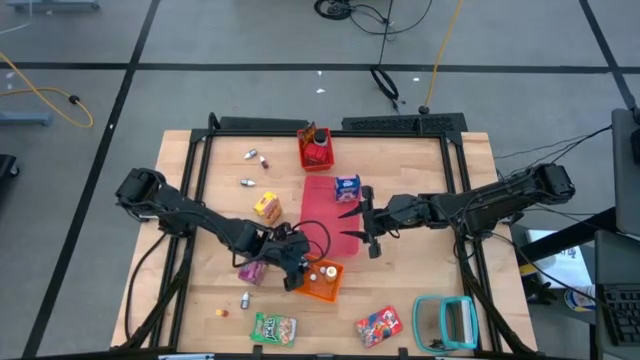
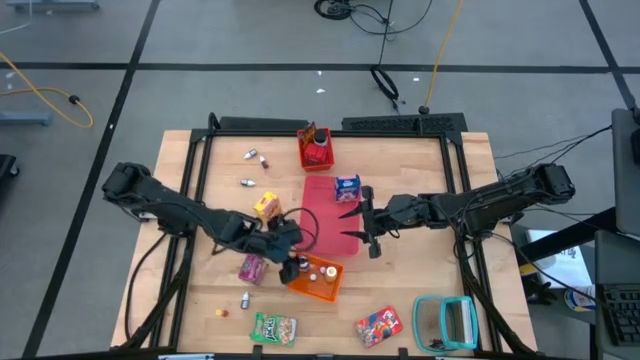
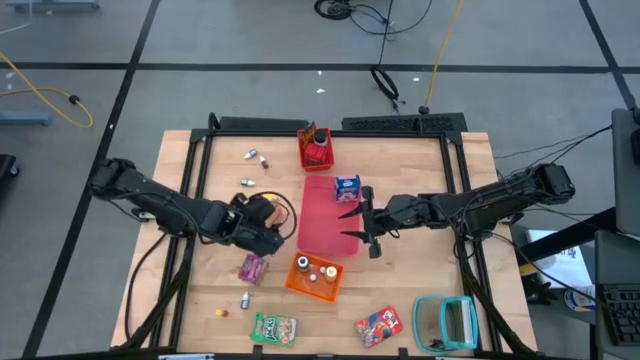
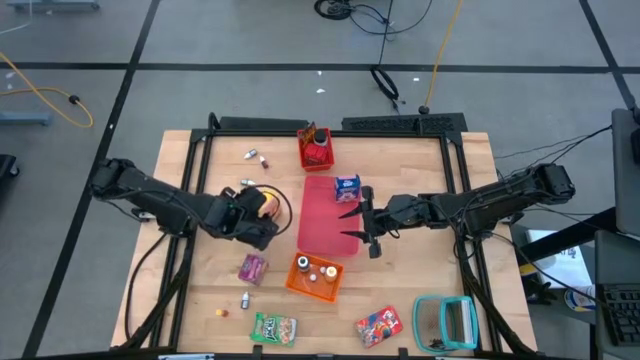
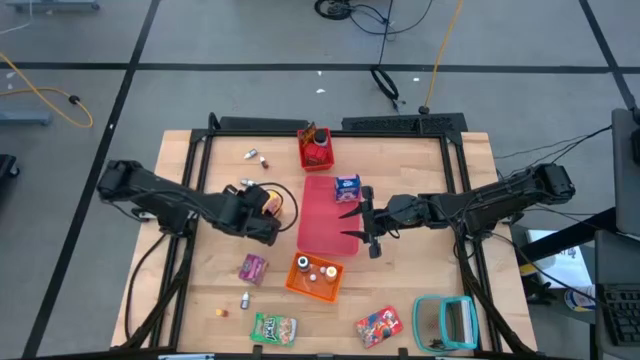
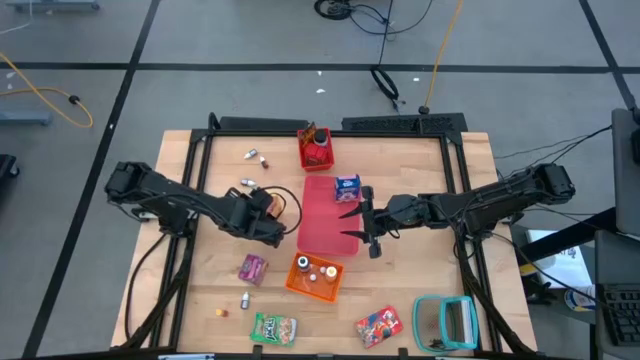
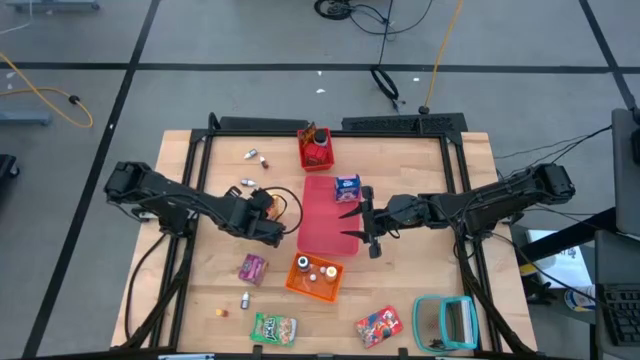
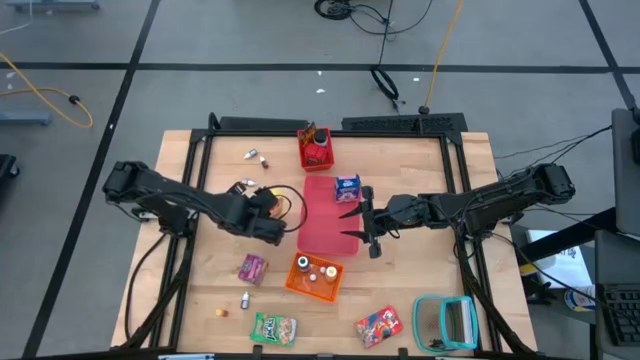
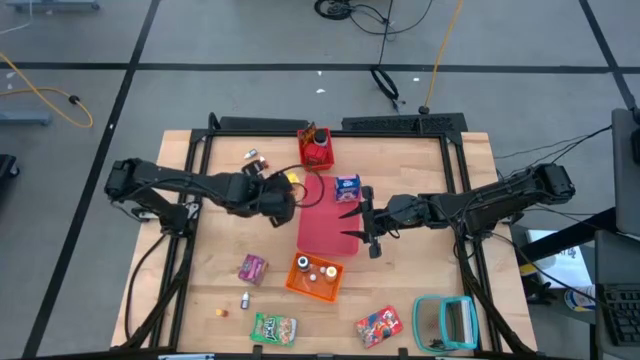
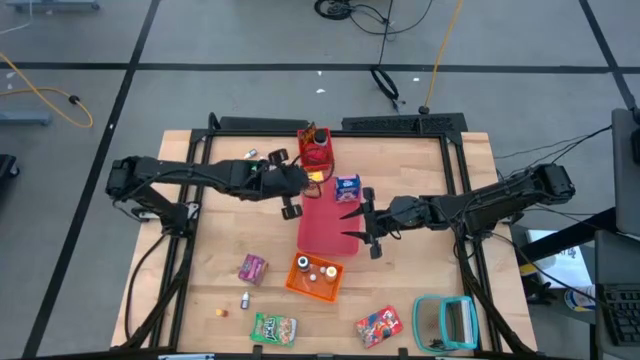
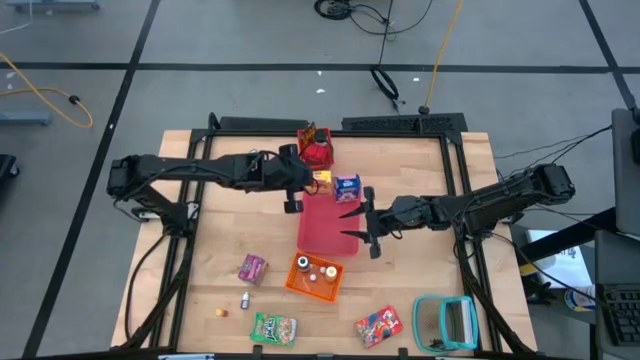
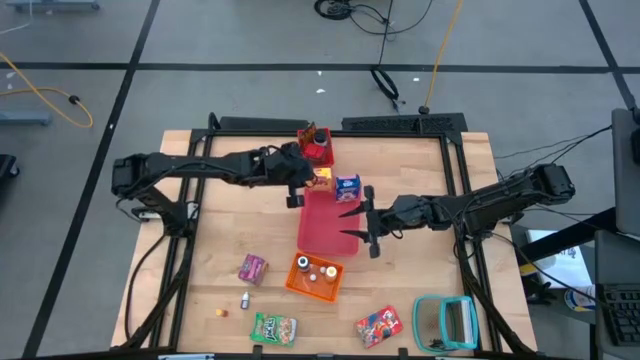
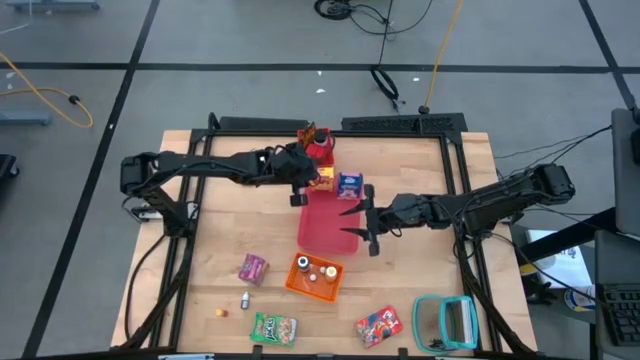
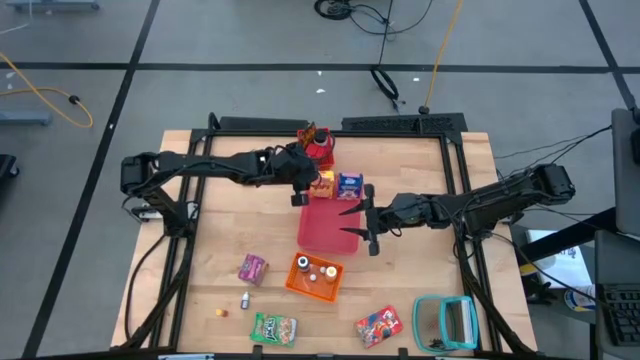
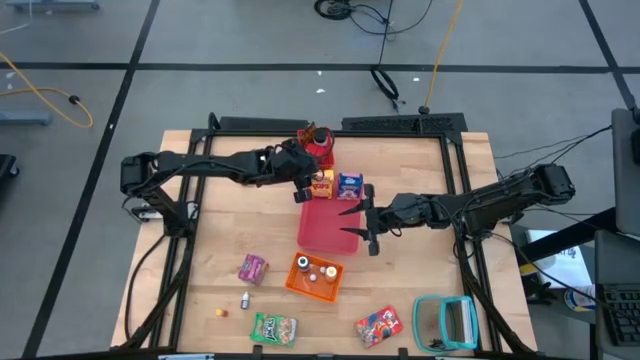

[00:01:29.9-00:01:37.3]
Task: Pick & Place Kitchen Items
Put the yellow cereal box into the pink bin

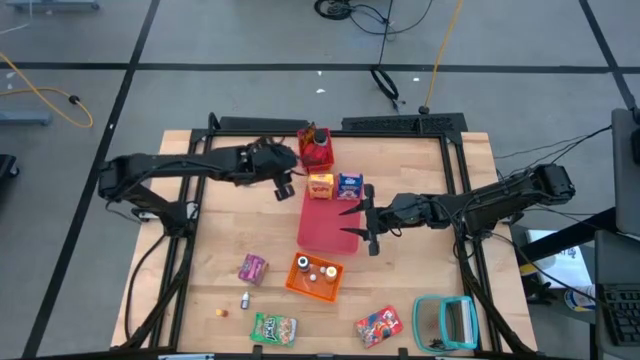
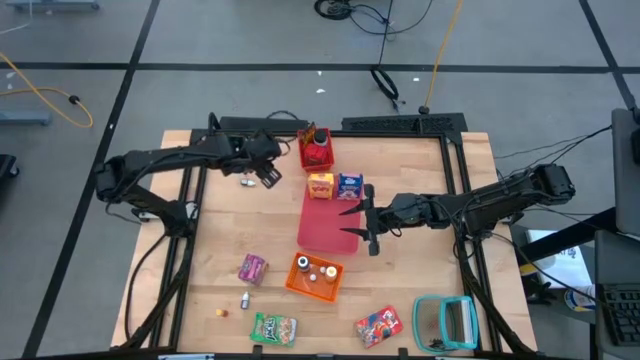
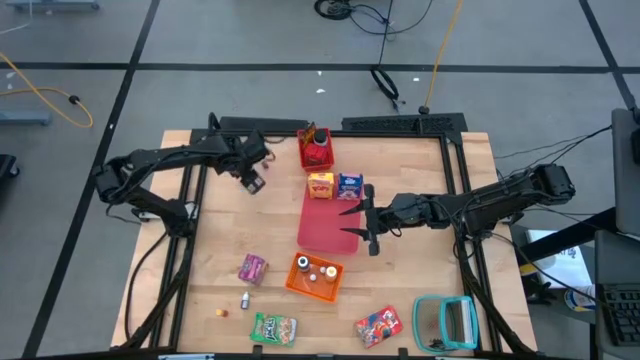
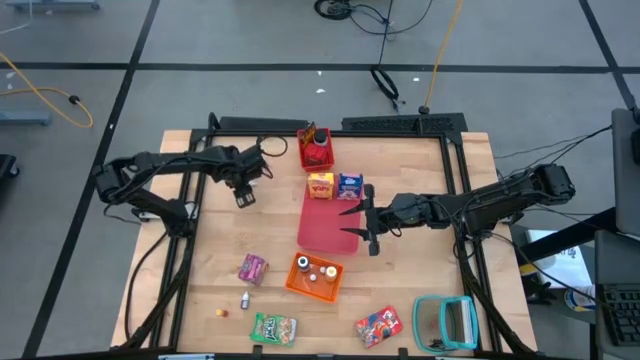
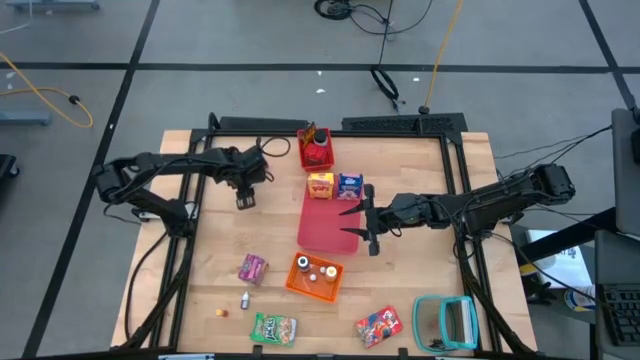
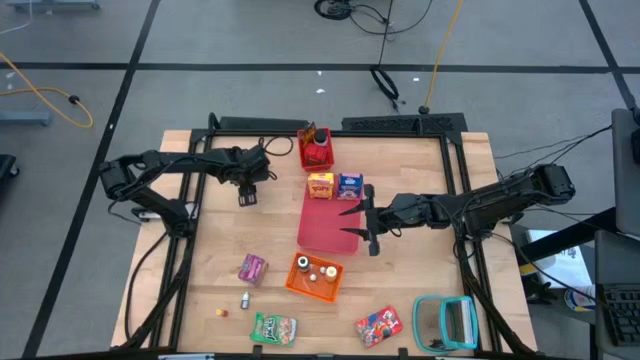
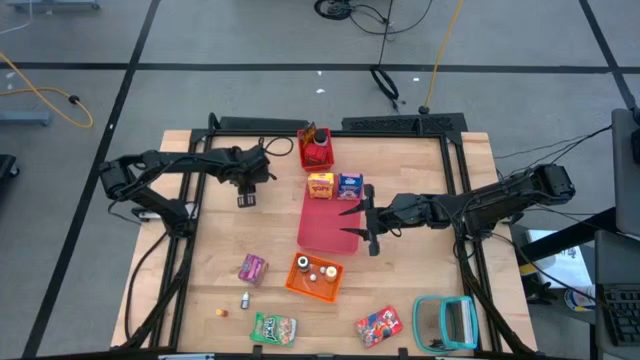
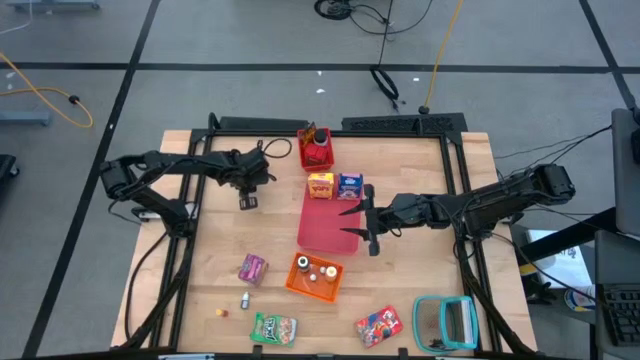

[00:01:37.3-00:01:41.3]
Put the small red food coloring bottle into the orange bin

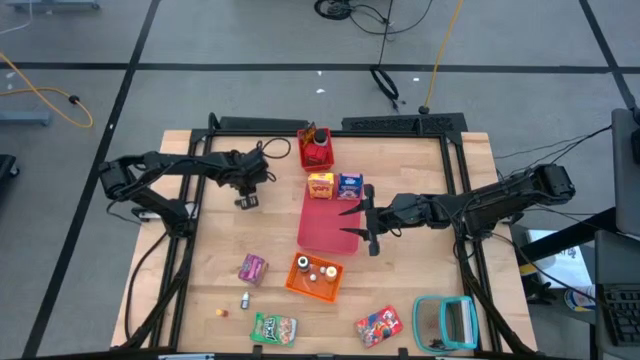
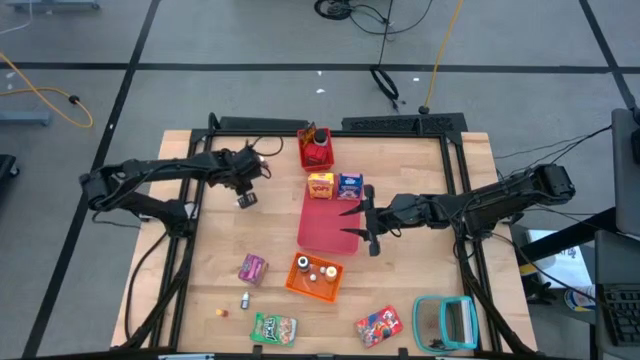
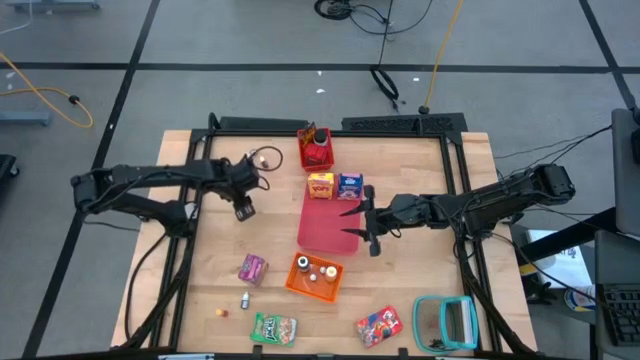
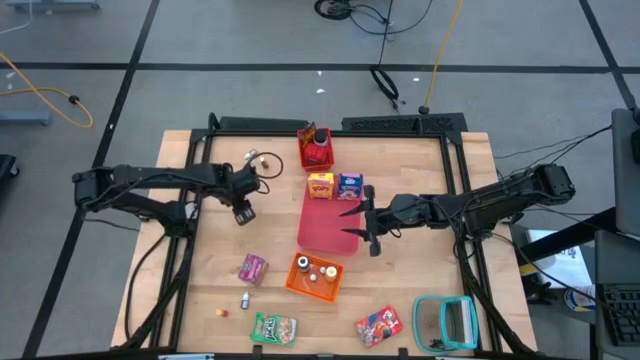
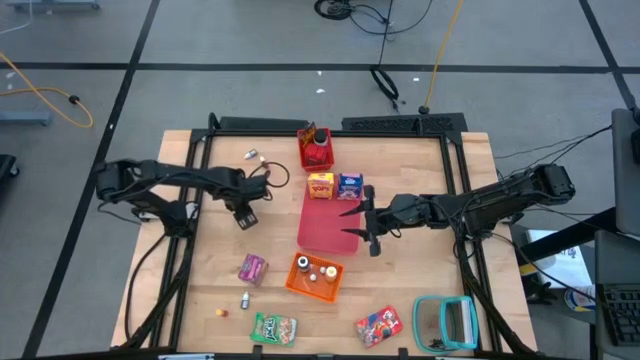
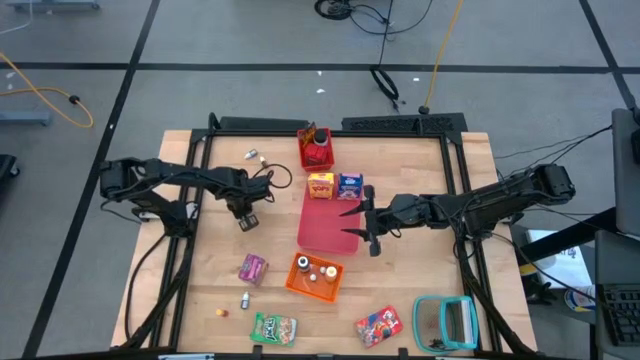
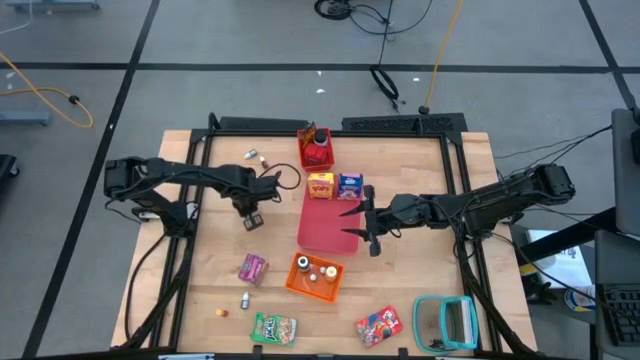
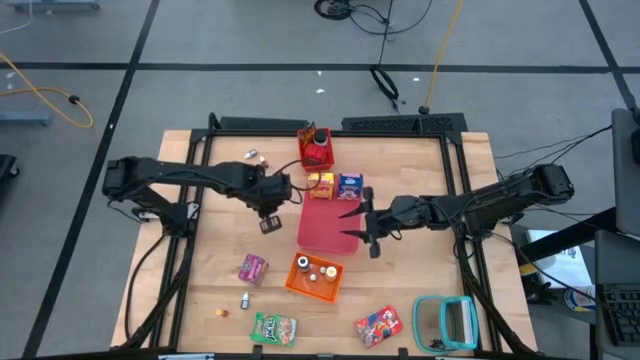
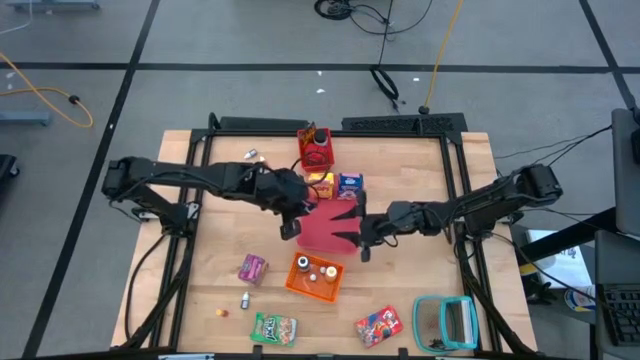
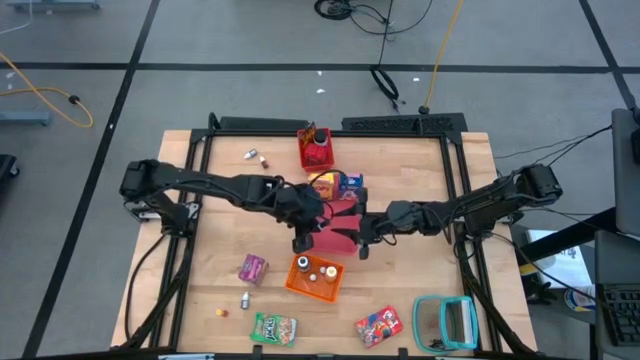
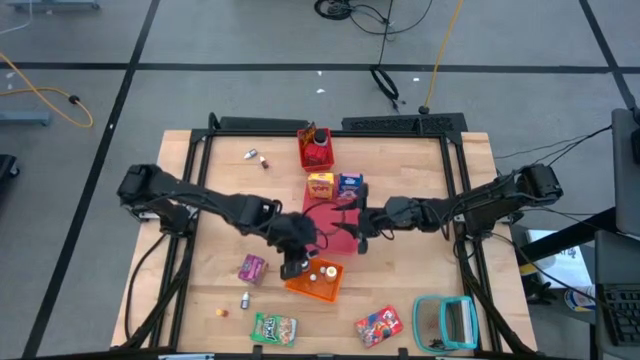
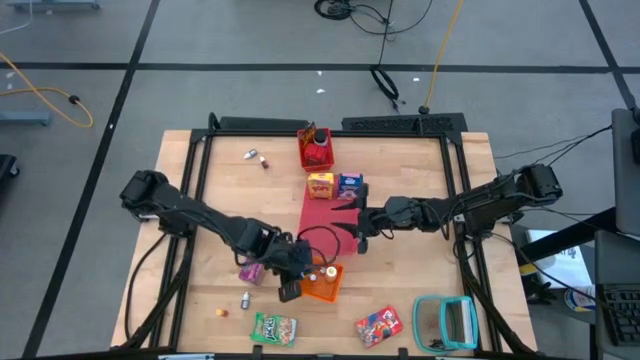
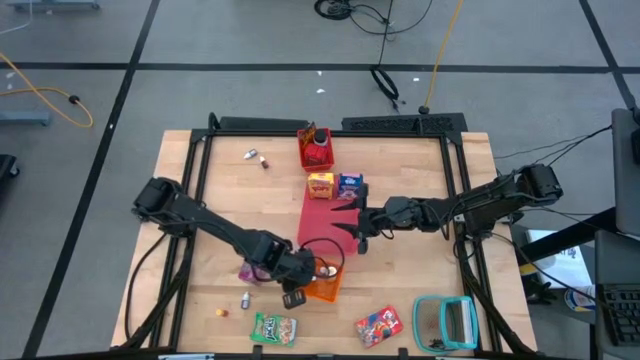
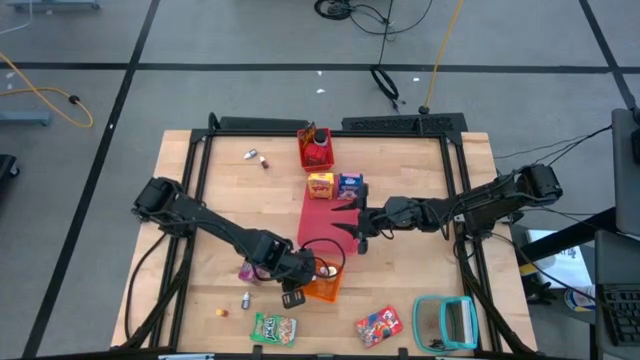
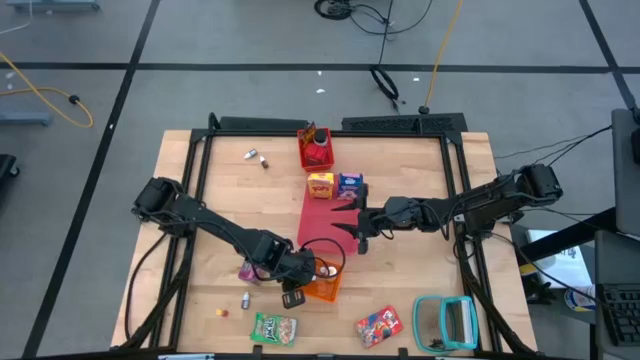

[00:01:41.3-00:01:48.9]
Put the small red food coloring bottle into the orange bin
